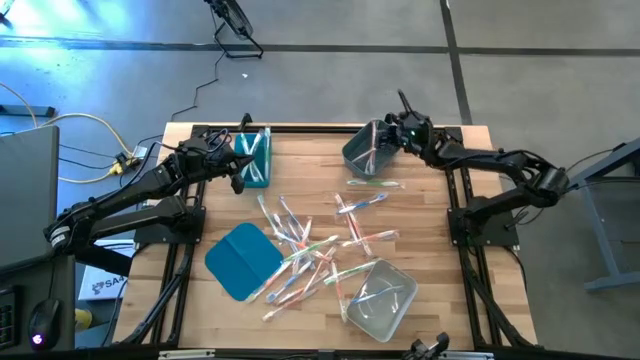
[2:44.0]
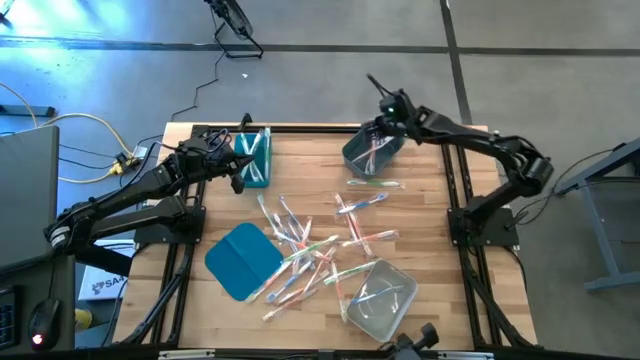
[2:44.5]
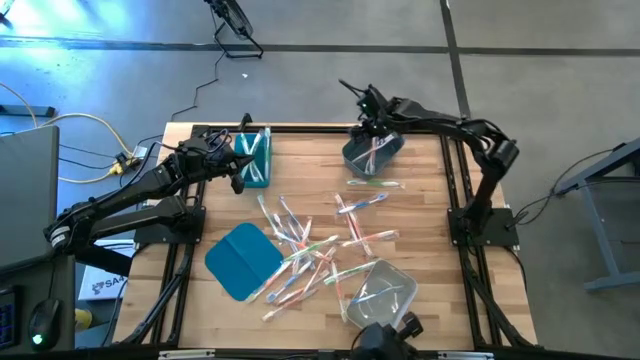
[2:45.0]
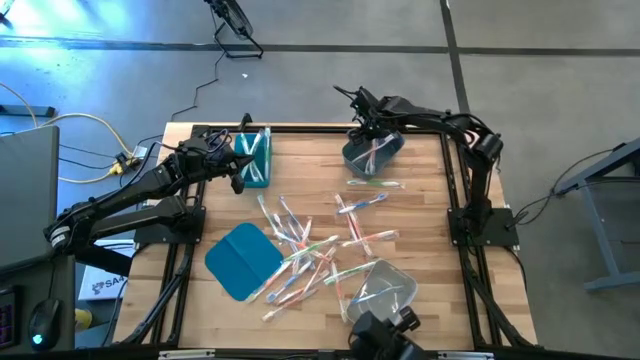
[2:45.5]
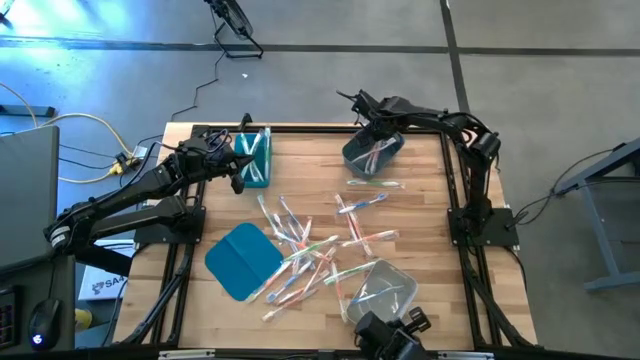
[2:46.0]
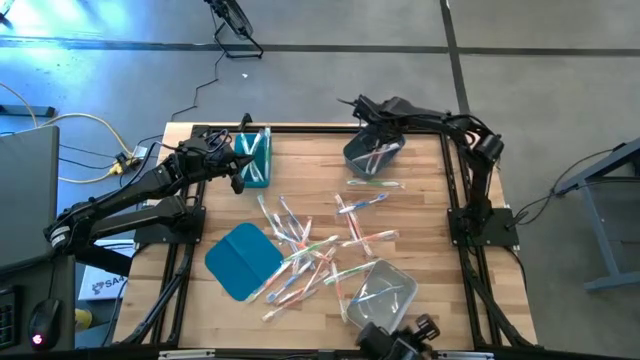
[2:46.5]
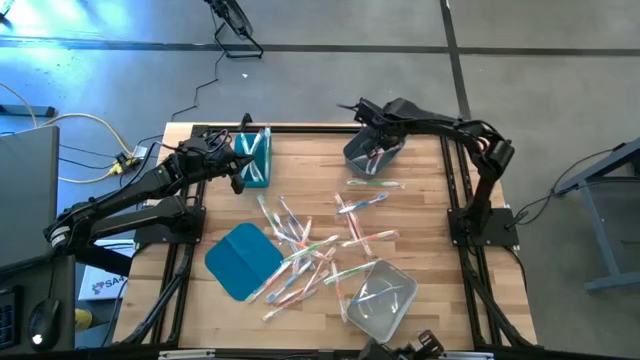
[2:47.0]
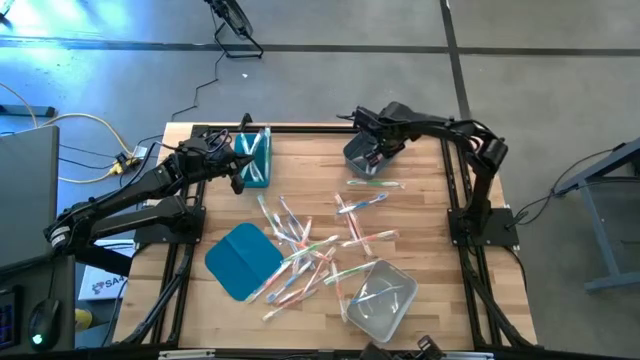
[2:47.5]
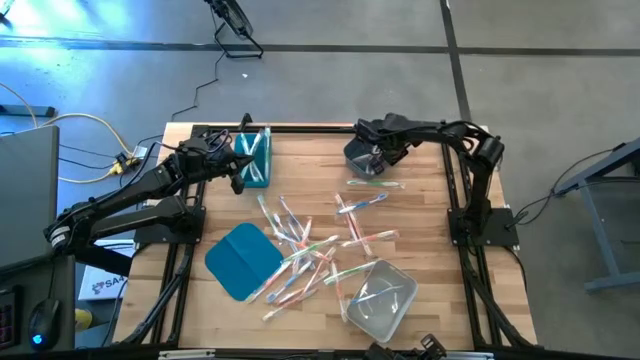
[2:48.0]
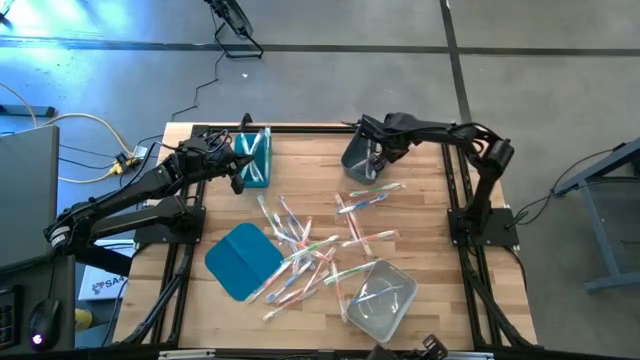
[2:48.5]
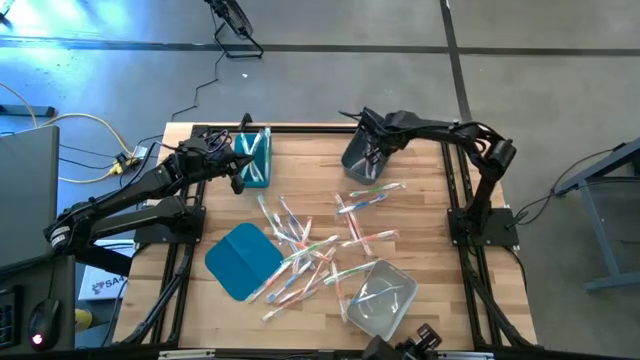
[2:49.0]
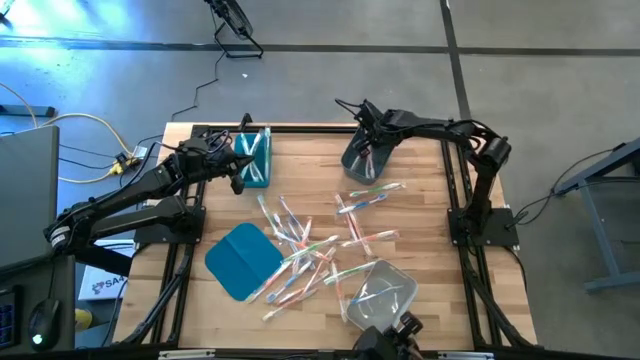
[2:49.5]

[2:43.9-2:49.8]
Task: Pick & Place Toothbrushes
Adjust the orange toothbrushes in the dark gray bin

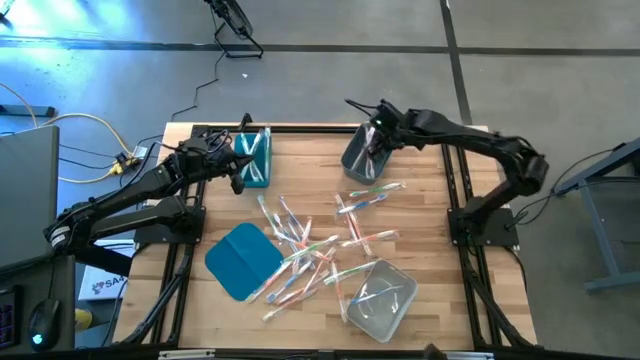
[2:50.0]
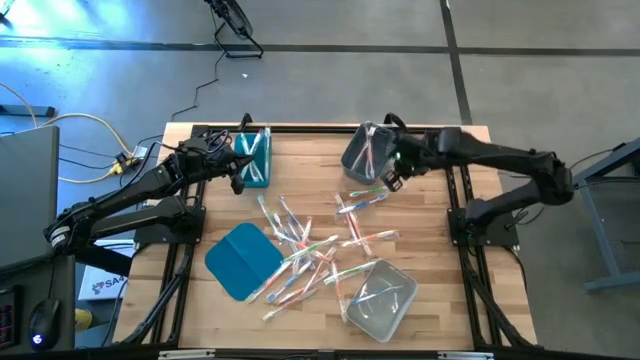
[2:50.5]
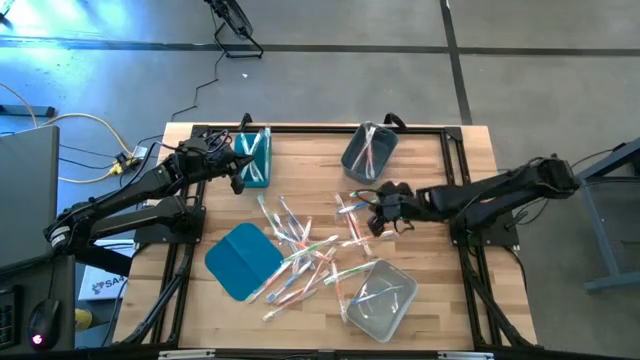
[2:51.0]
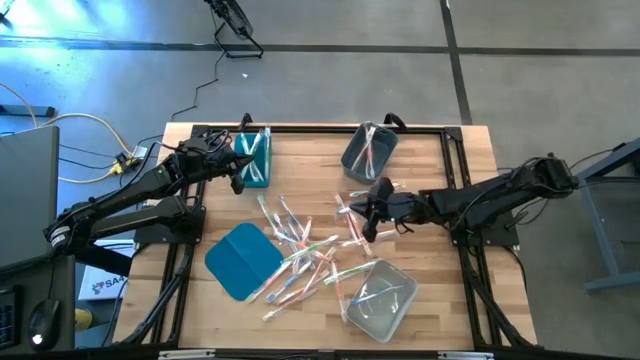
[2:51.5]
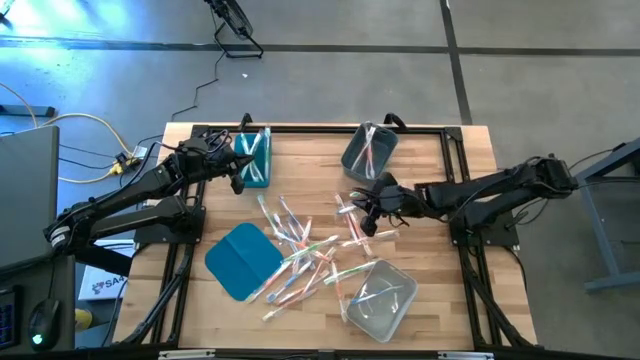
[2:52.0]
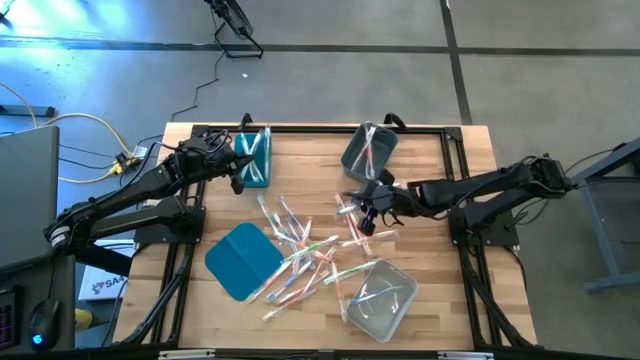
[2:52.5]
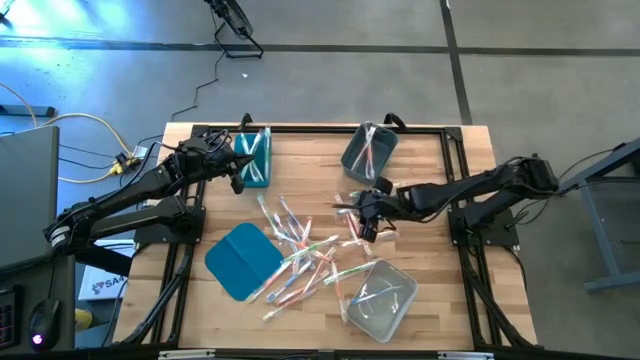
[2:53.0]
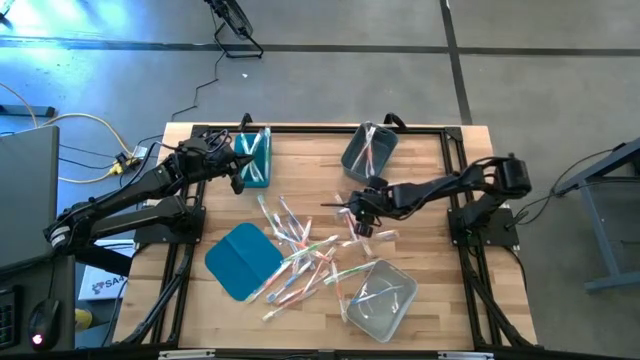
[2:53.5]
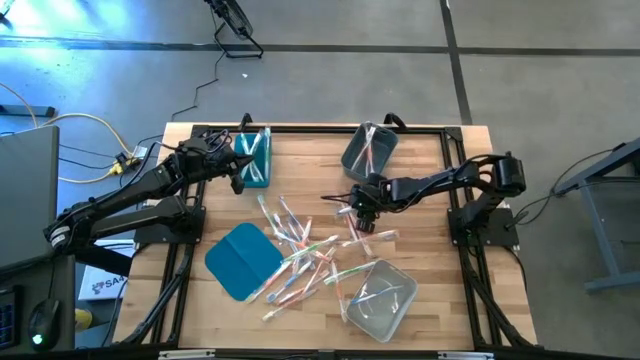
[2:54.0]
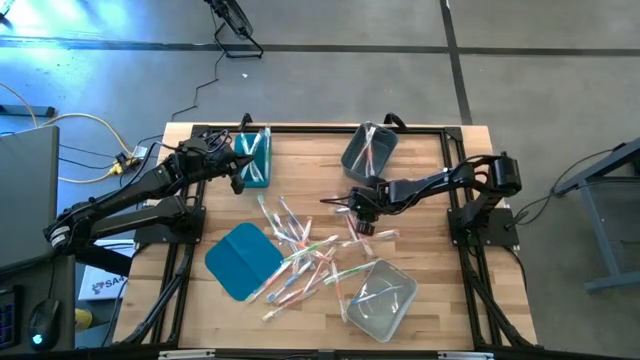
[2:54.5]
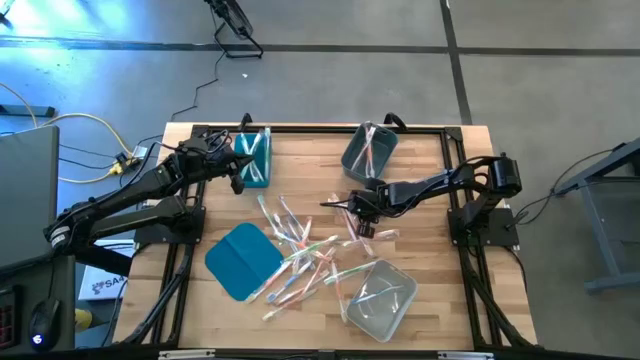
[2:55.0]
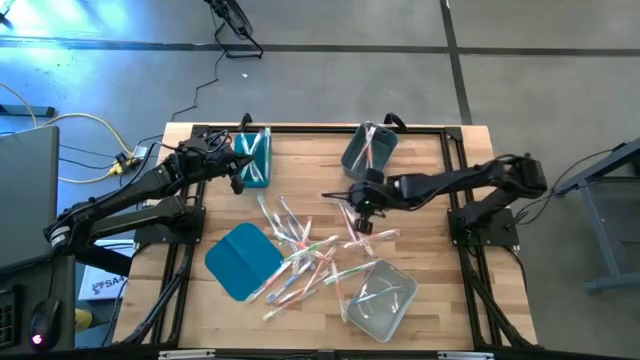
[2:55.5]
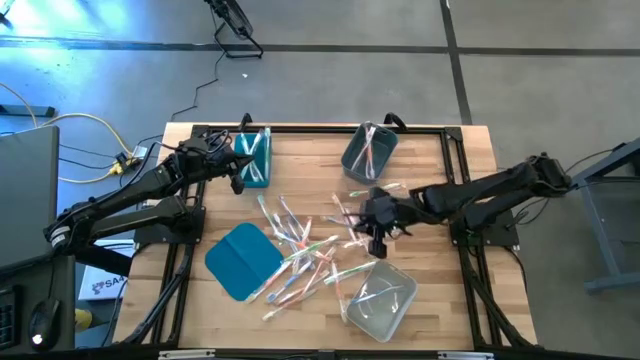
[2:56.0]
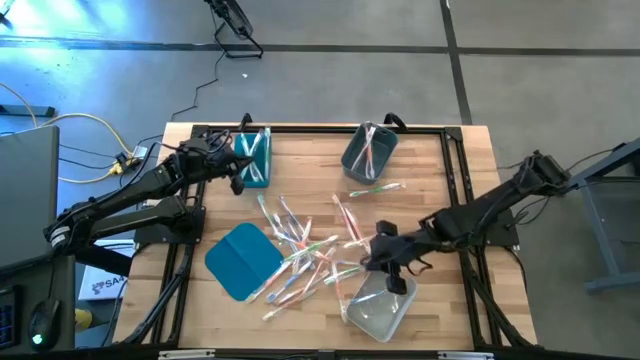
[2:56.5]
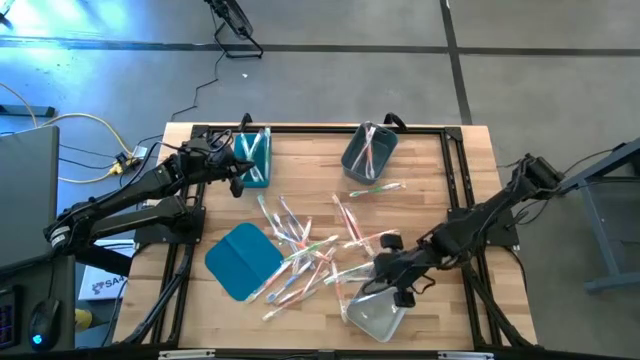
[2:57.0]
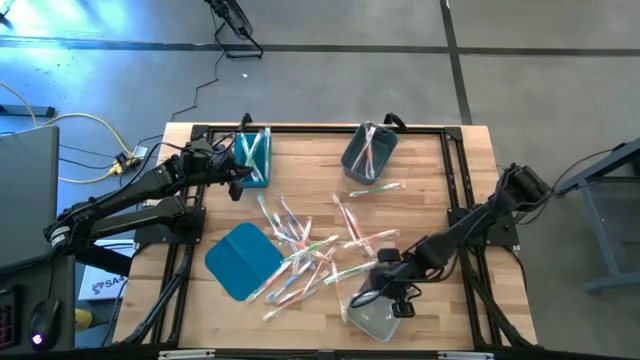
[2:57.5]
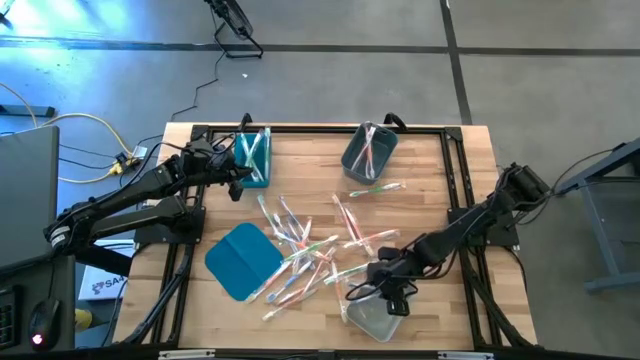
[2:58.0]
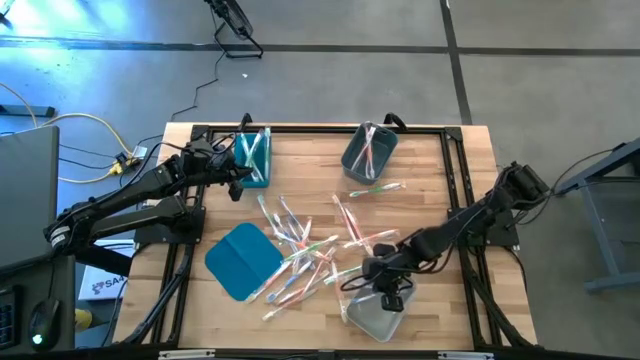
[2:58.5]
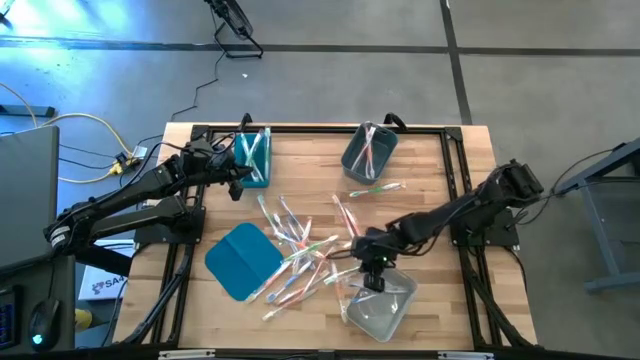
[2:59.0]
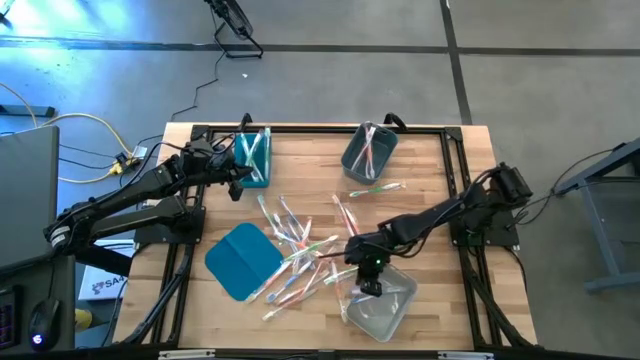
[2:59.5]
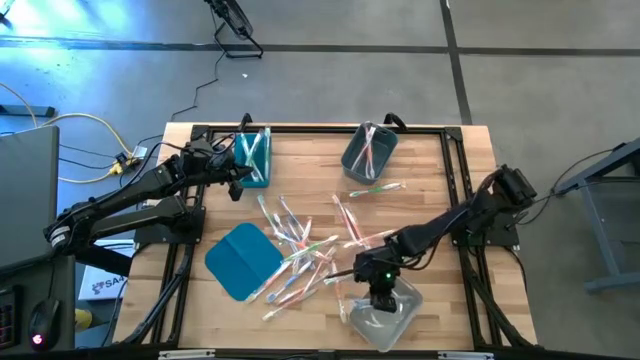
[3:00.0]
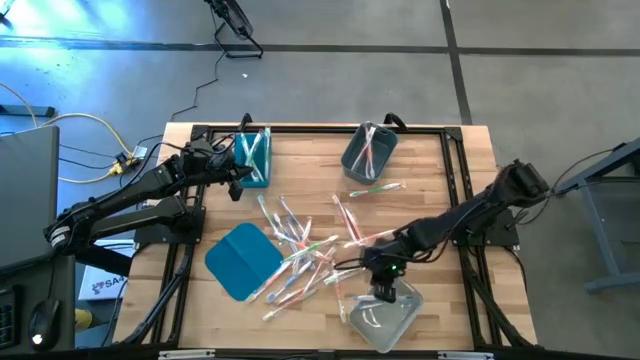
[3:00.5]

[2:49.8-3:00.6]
Put the blue toothbrush into the light gray bin

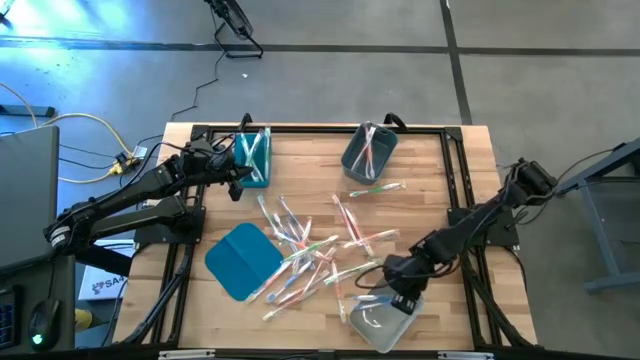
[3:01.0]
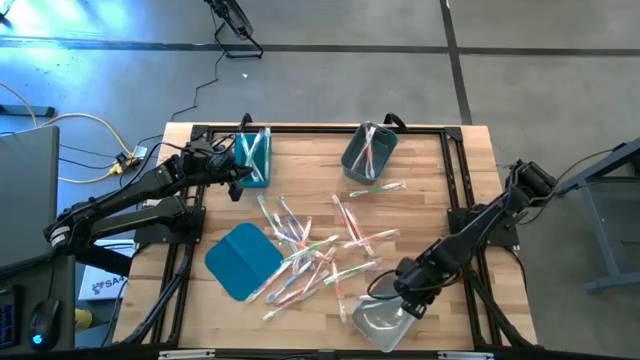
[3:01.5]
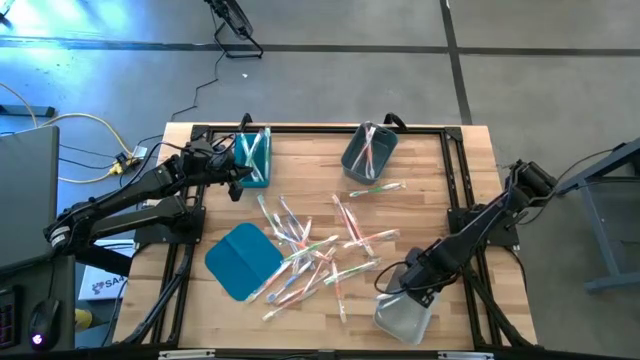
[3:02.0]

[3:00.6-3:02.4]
Adjust the light gray bin on the table
